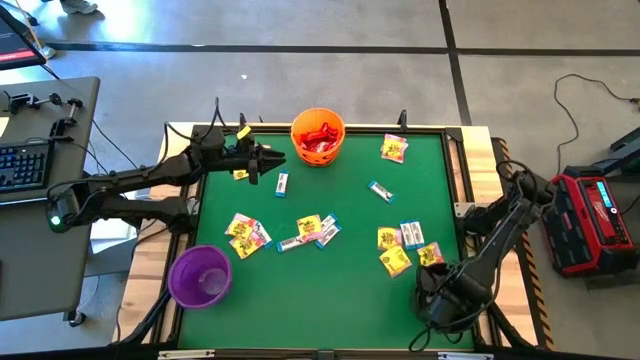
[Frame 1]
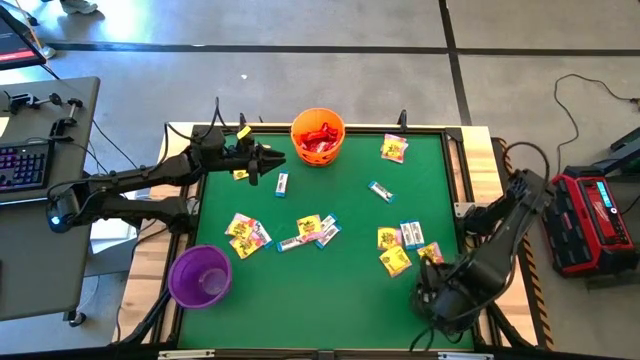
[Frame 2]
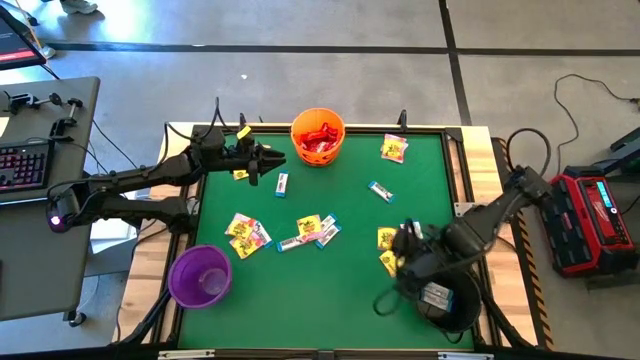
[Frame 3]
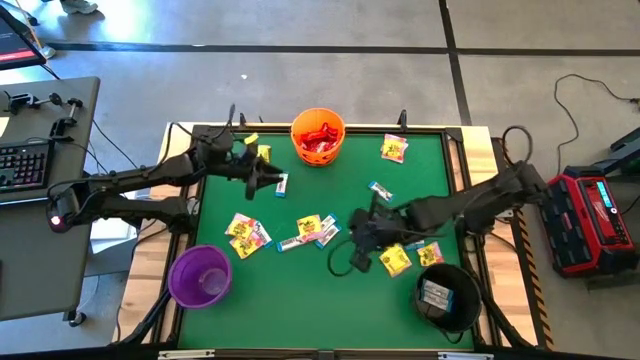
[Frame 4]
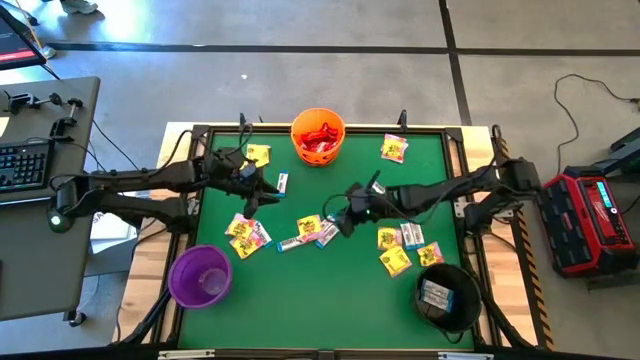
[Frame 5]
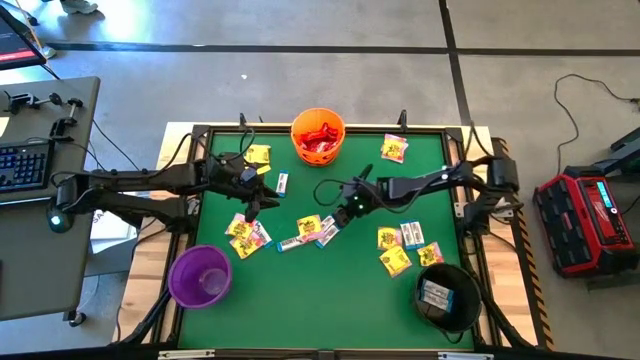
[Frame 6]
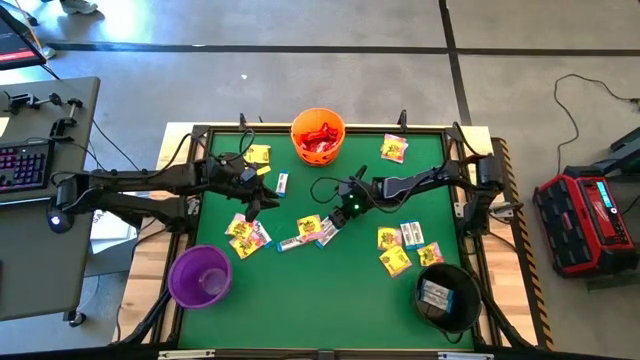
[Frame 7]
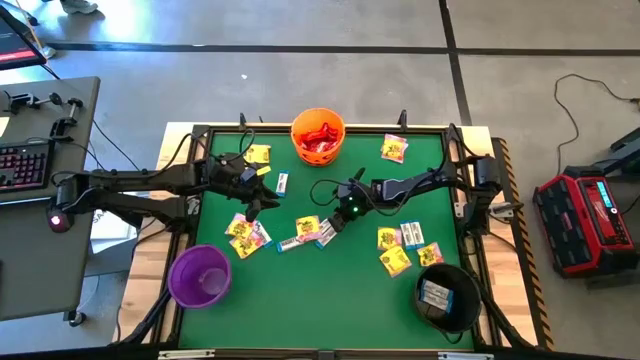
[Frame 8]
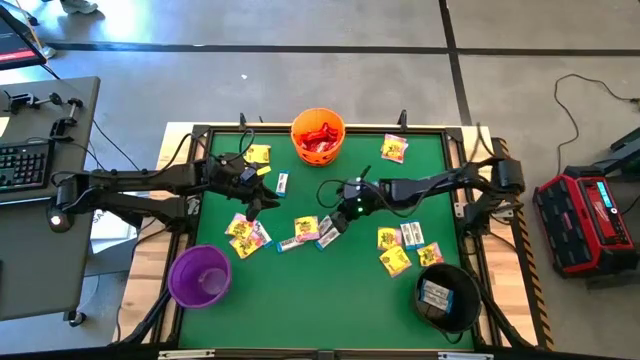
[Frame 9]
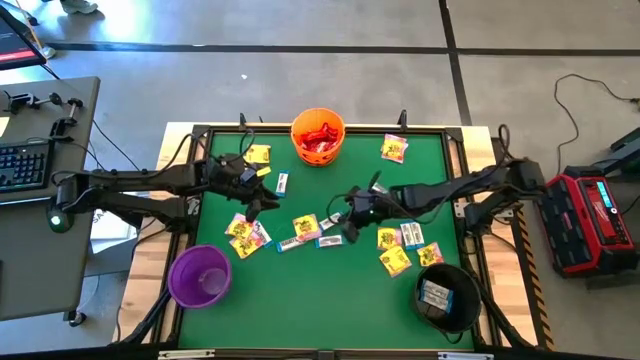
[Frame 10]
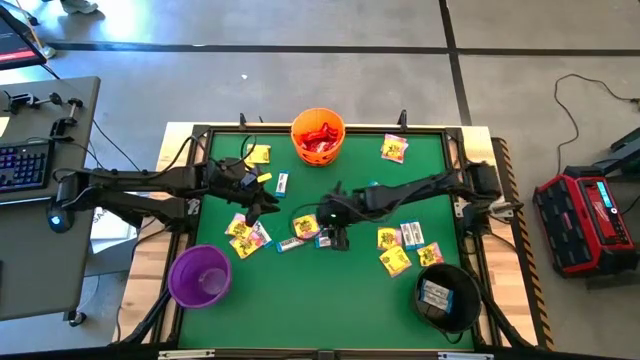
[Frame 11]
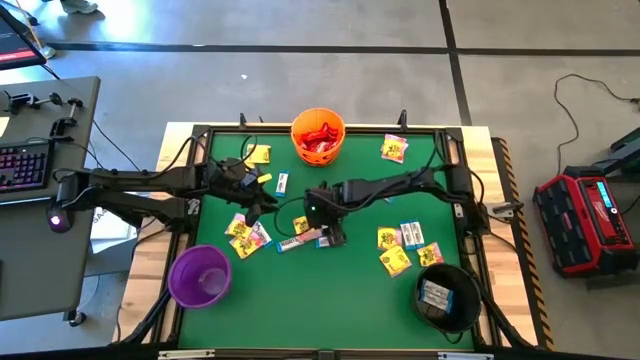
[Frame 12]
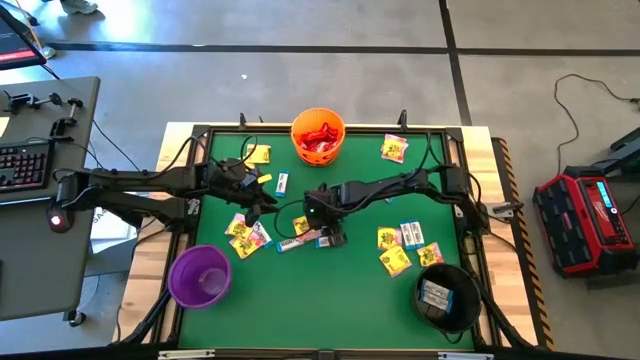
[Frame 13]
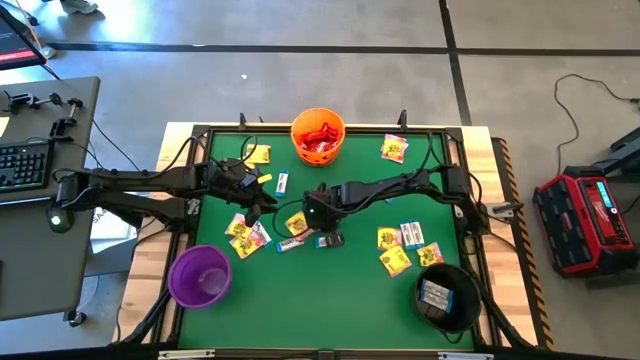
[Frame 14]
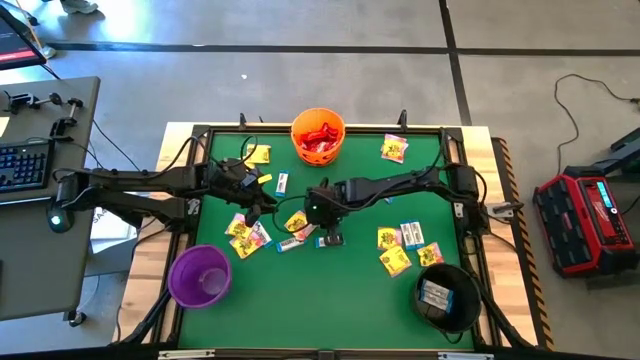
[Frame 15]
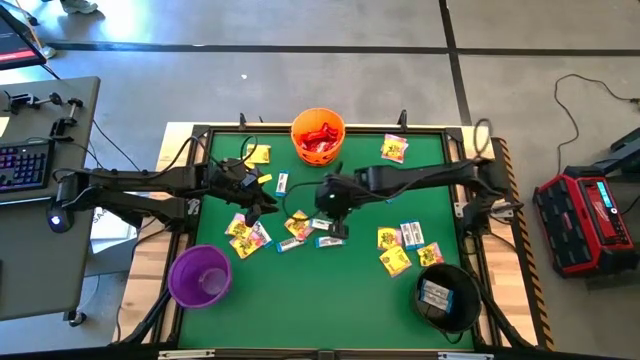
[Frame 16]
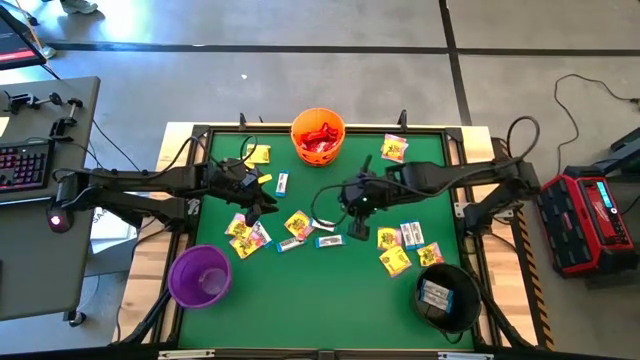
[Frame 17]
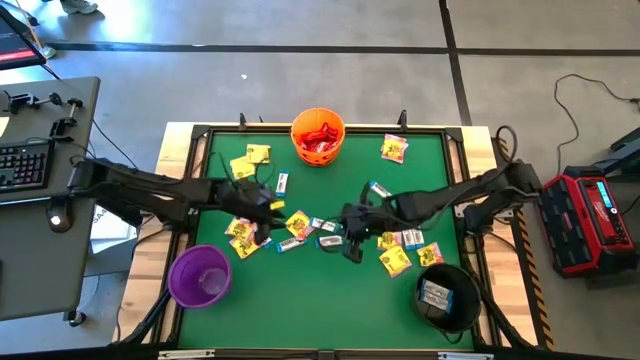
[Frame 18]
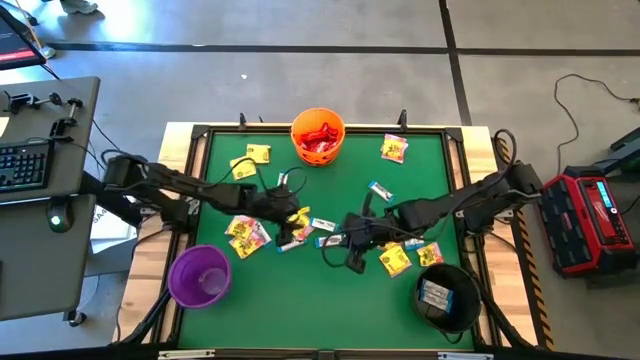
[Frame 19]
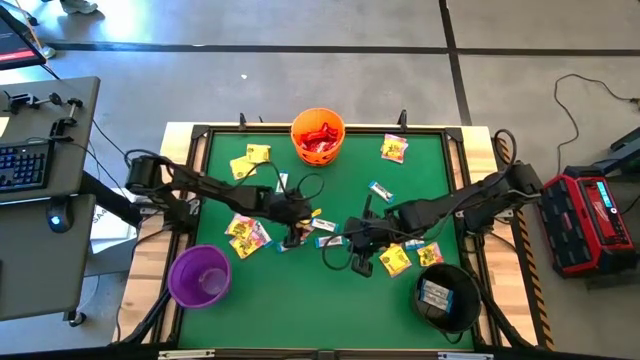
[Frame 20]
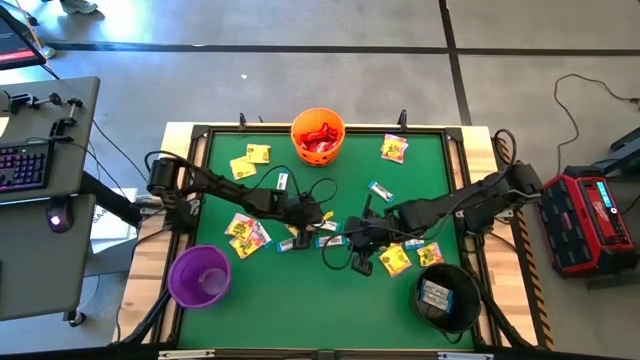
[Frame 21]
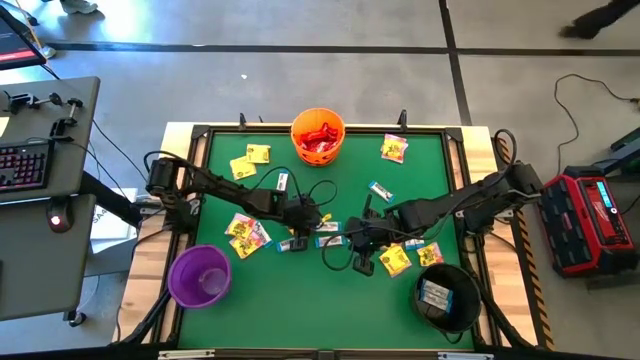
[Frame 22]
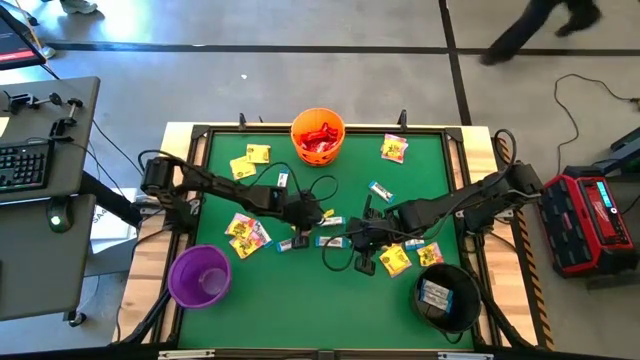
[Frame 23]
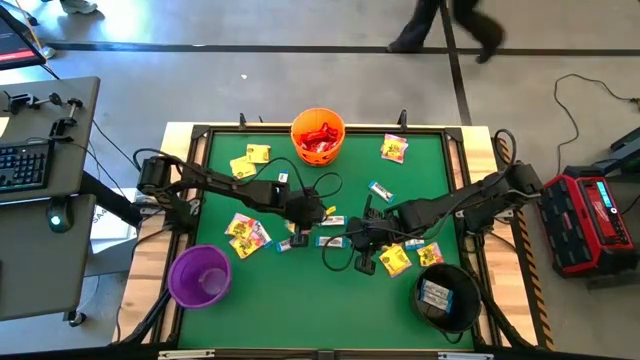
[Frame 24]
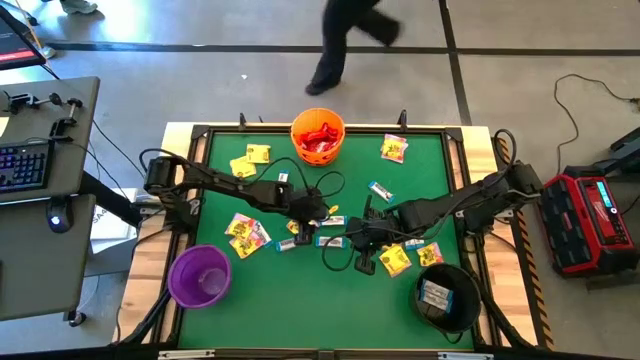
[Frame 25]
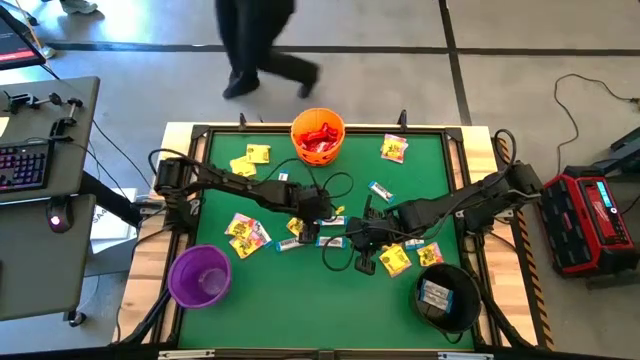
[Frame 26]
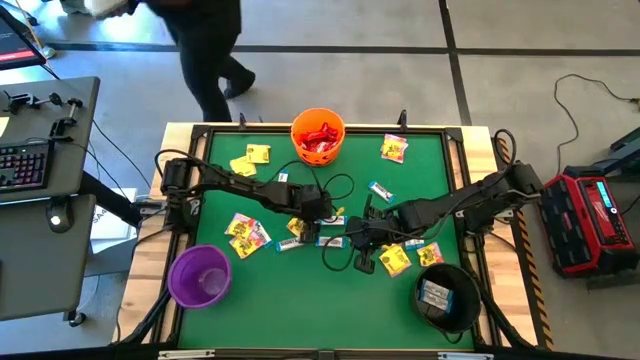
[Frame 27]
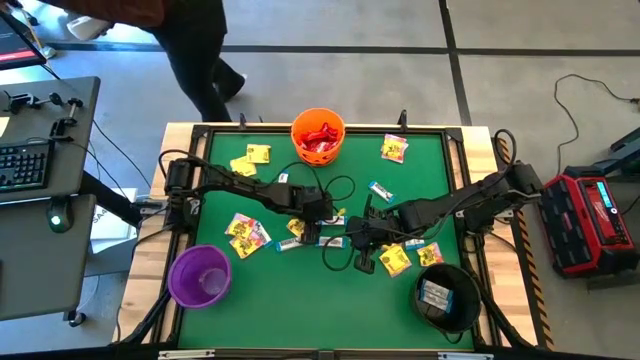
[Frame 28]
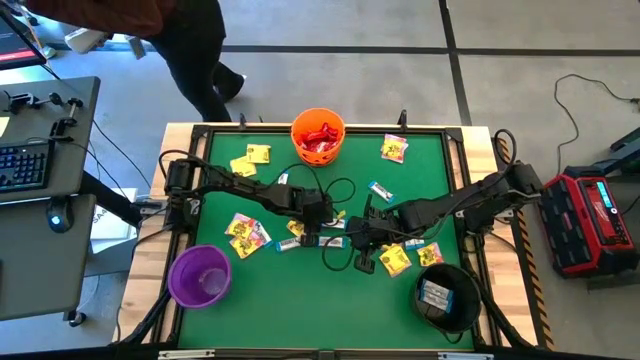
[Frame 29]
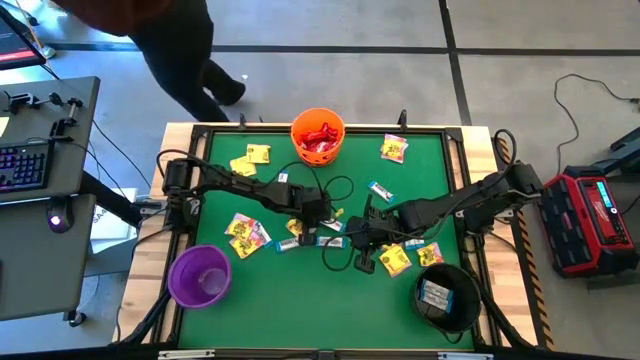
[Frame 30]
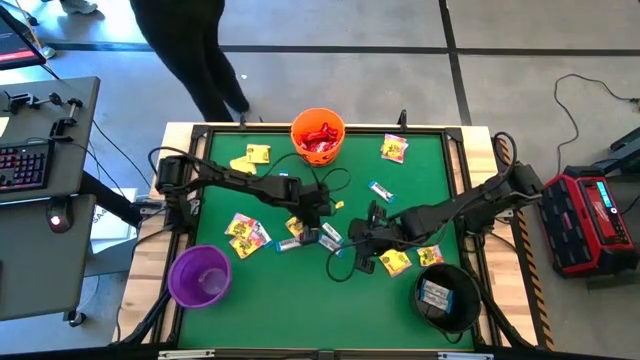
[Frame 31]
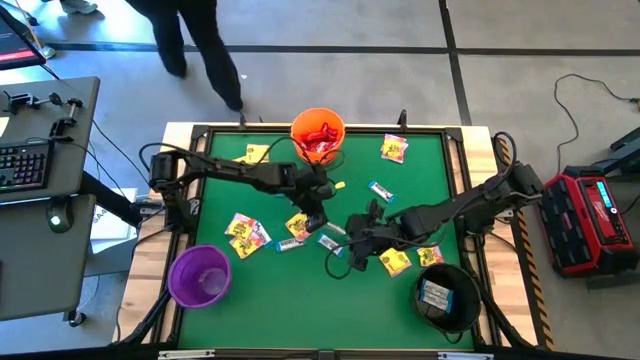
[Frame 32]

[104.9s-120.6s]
Task: Sort candy by brand, put in halloween buckets
Put the white chocolate bar into the black bucket

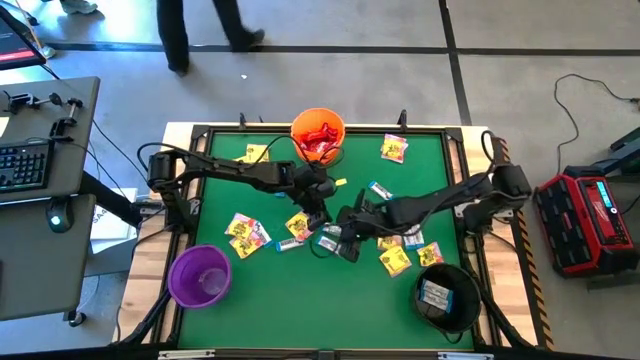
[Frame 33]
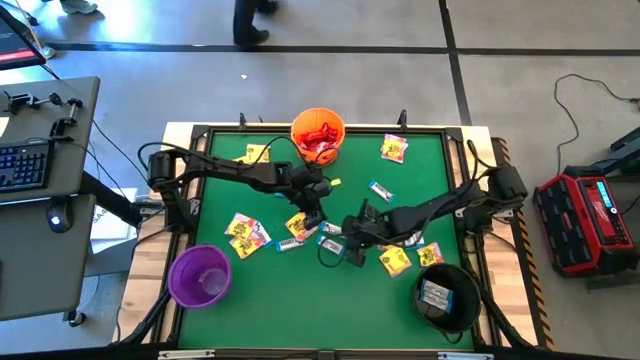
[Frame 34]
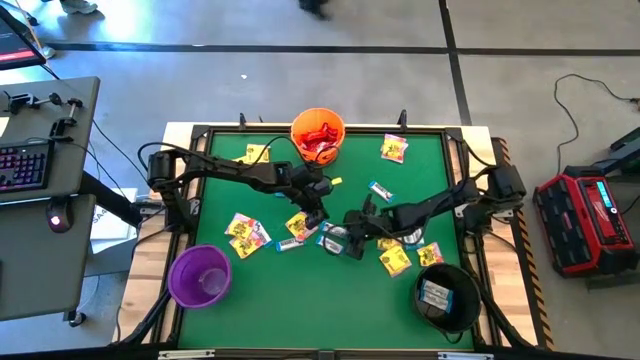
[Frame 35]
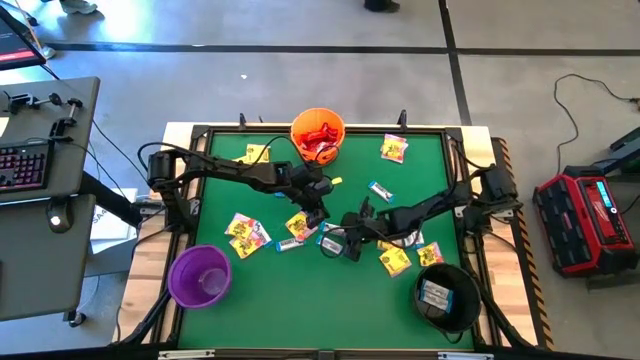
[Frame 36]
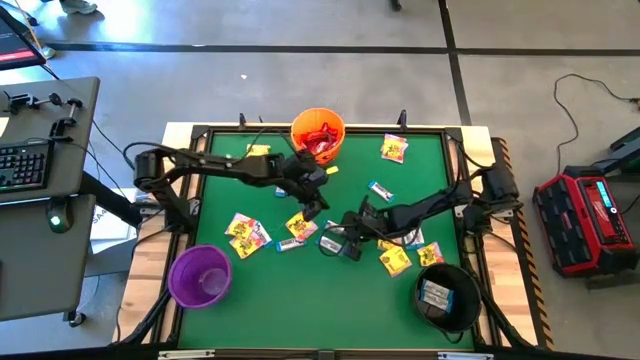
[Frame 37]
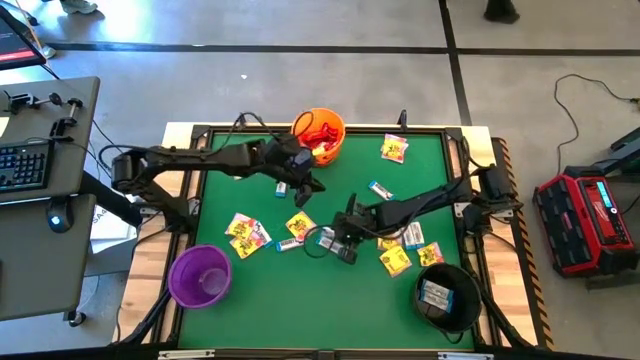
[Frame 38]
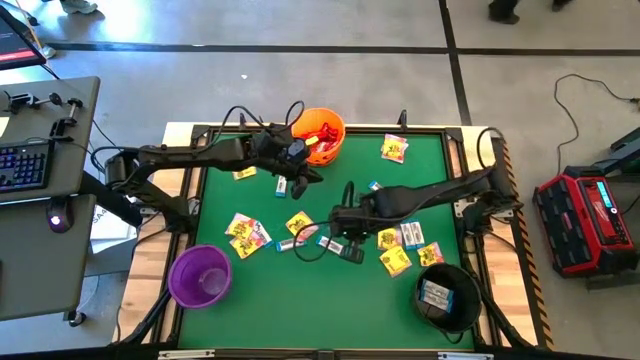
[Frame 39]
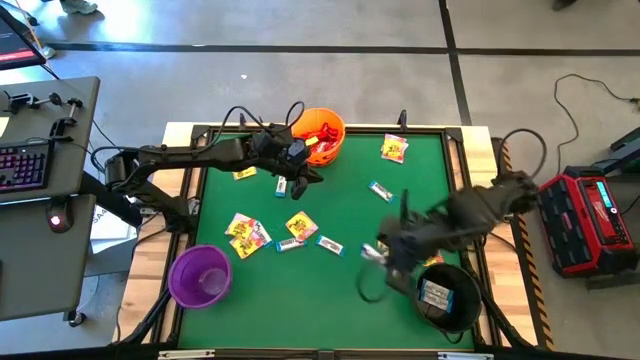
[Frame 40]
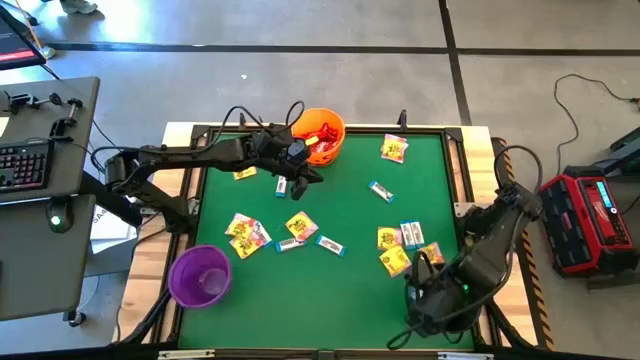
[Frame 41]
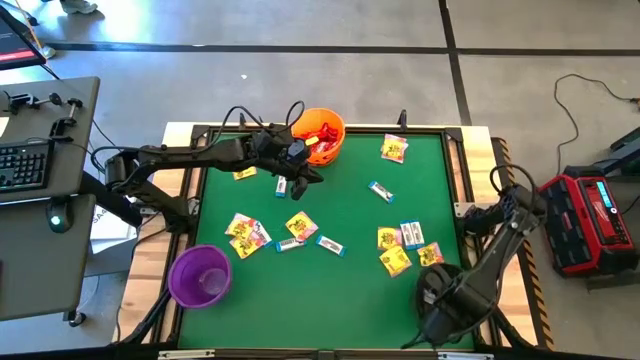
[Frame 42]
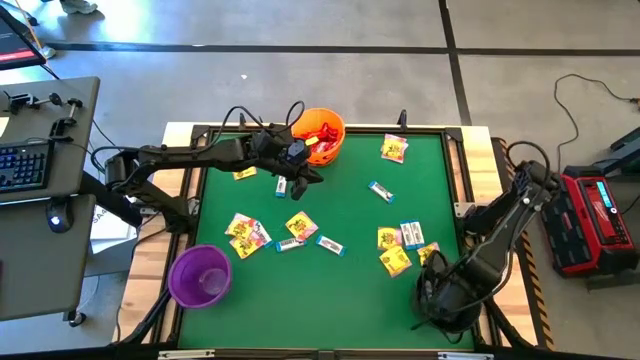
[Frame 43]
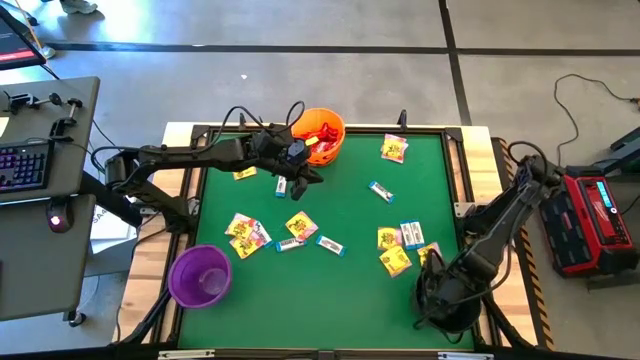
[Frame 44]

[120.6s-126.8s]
Put the white chocolate bar into the black bucket

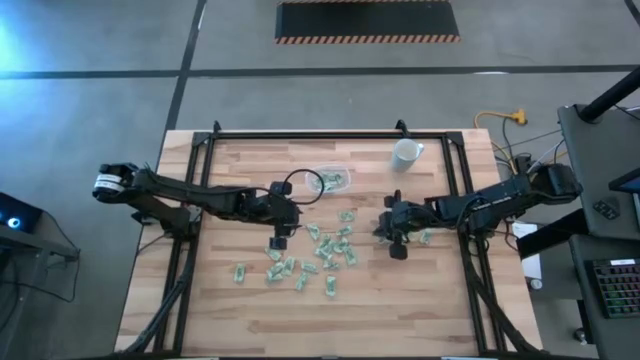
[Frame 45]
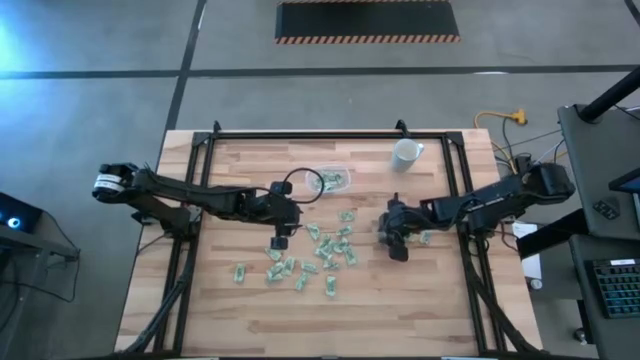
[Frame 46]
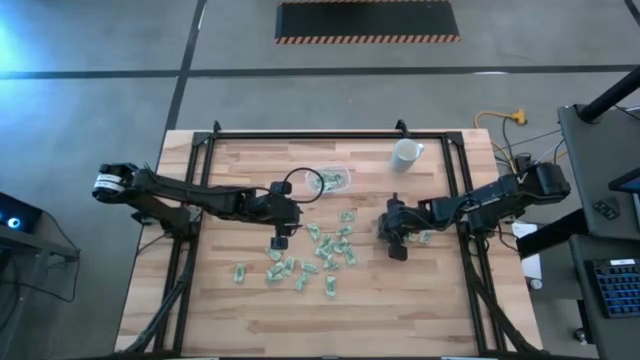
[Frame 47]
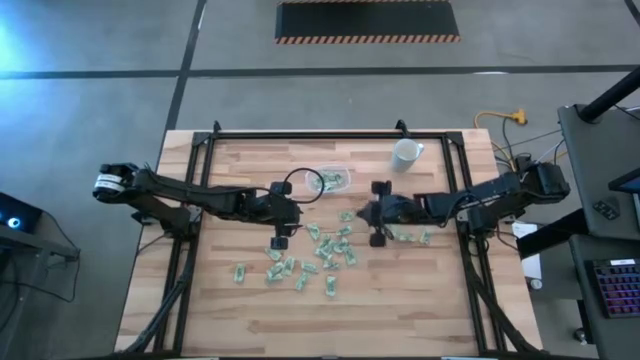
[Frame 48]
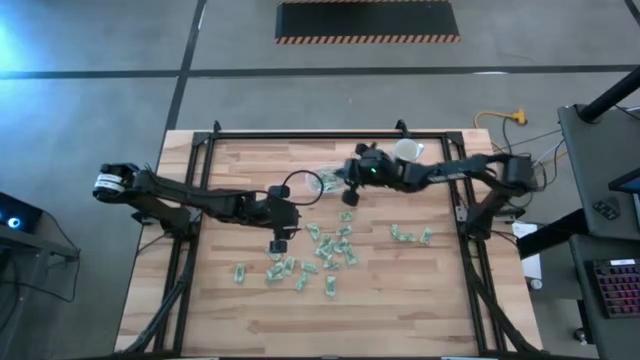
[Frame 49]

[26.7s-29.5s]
Task: Pick and place Stevia / Truvia into bins
Put the stevia packet into the transparent container
